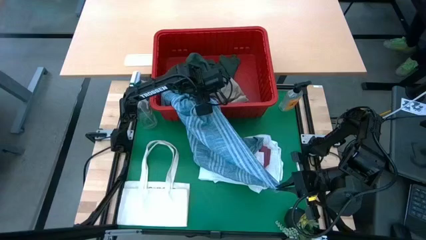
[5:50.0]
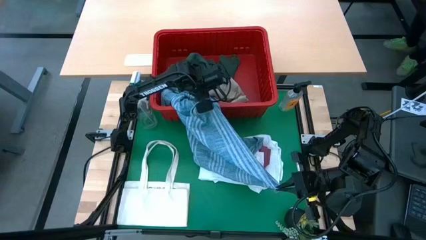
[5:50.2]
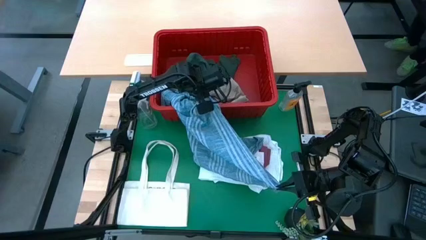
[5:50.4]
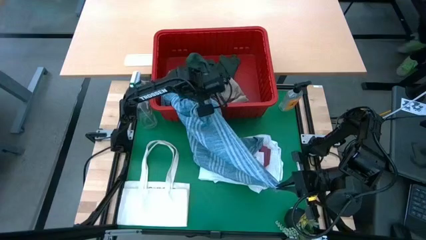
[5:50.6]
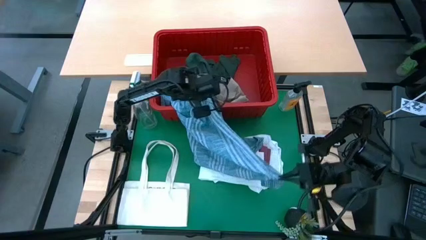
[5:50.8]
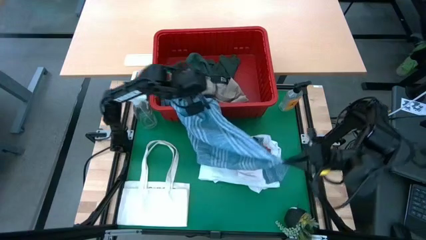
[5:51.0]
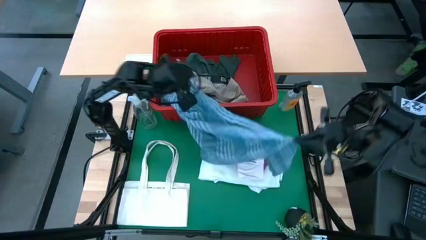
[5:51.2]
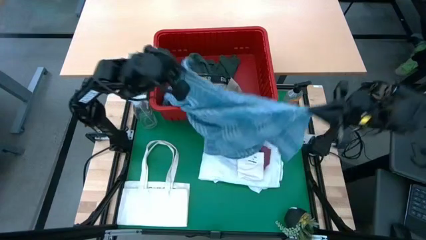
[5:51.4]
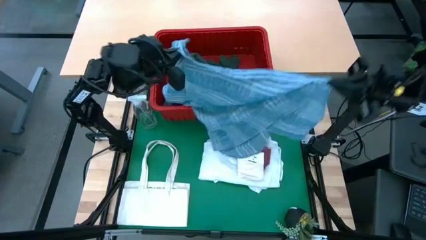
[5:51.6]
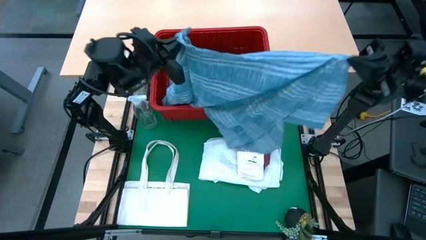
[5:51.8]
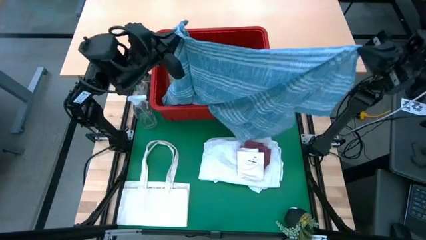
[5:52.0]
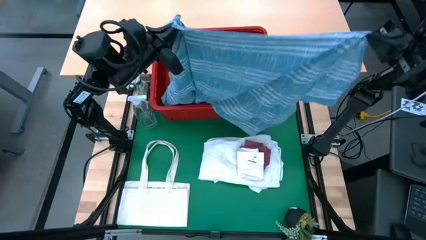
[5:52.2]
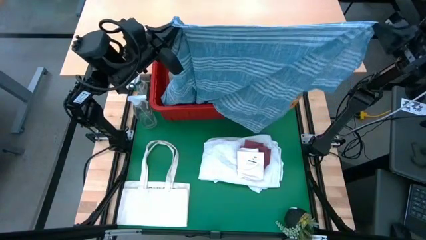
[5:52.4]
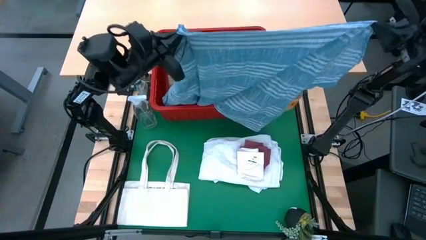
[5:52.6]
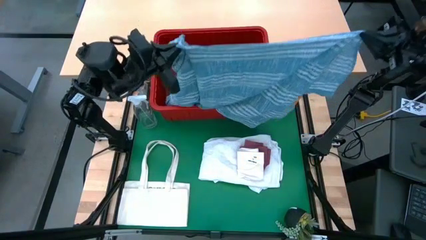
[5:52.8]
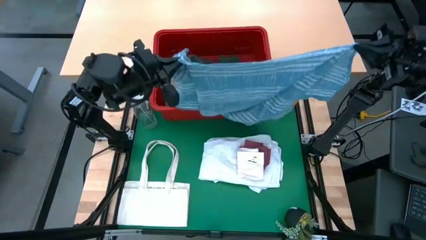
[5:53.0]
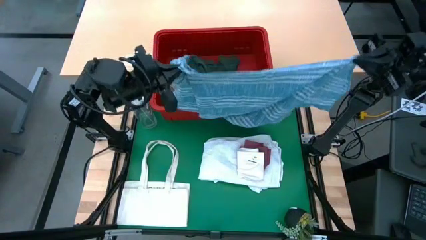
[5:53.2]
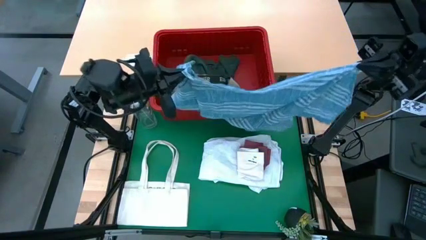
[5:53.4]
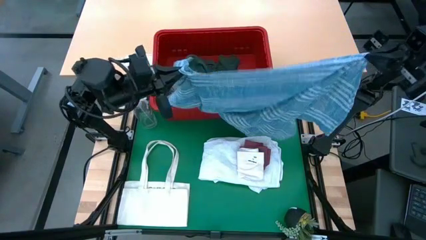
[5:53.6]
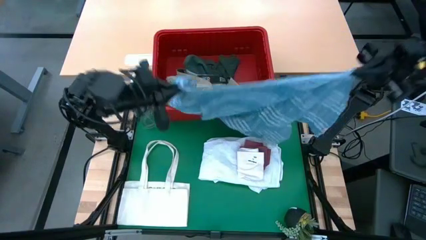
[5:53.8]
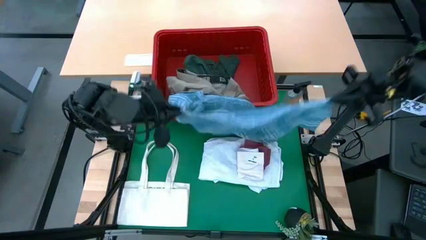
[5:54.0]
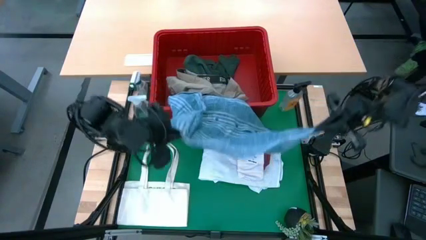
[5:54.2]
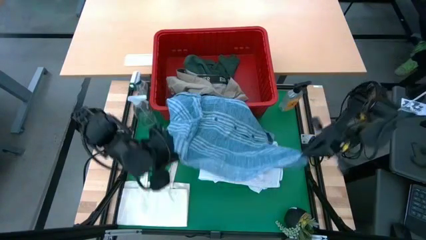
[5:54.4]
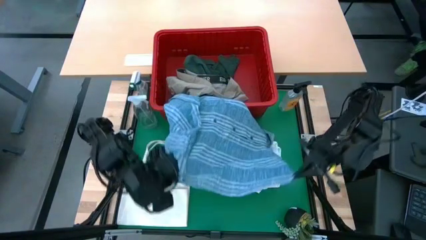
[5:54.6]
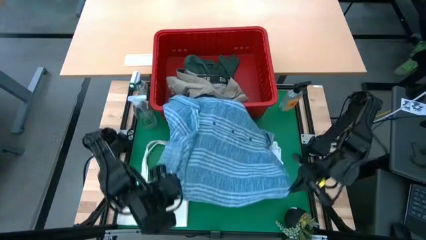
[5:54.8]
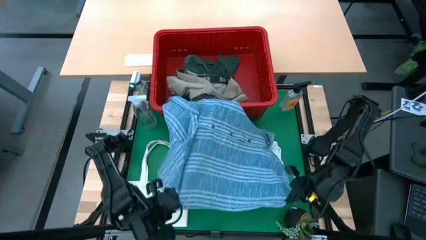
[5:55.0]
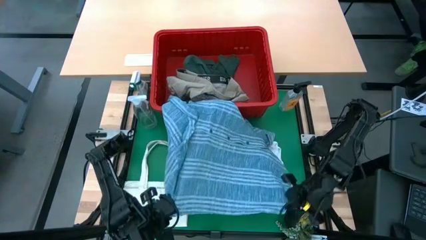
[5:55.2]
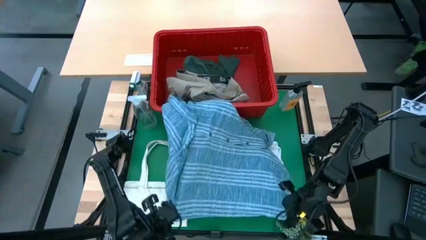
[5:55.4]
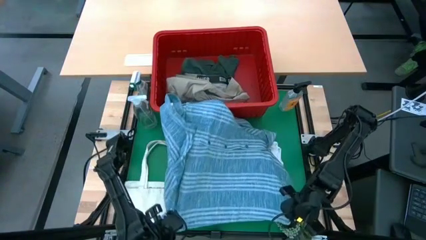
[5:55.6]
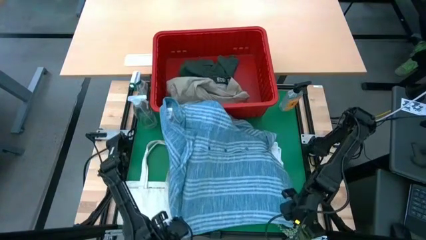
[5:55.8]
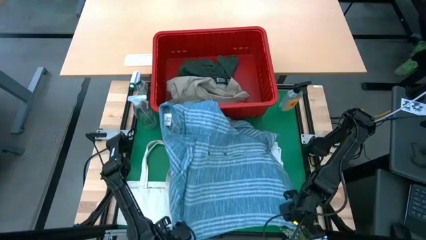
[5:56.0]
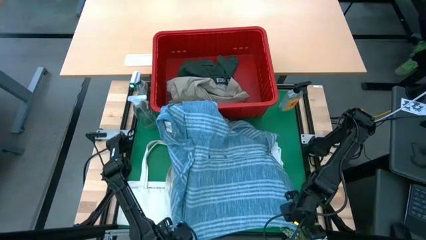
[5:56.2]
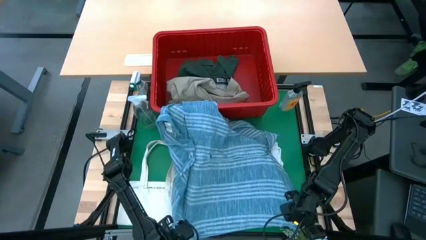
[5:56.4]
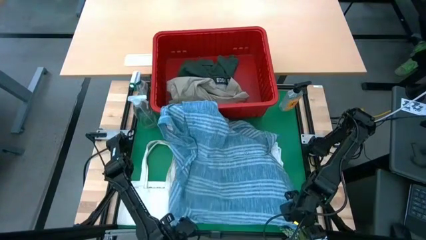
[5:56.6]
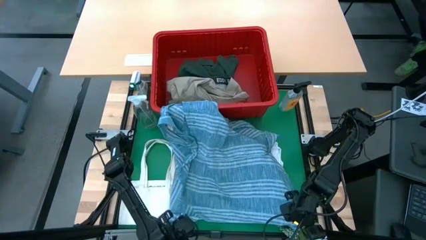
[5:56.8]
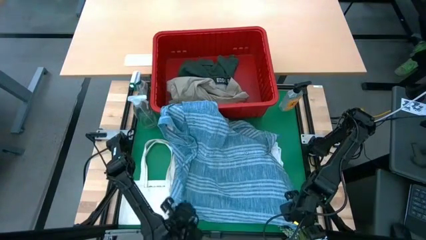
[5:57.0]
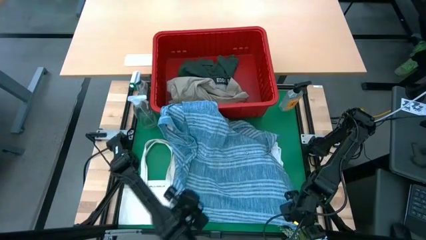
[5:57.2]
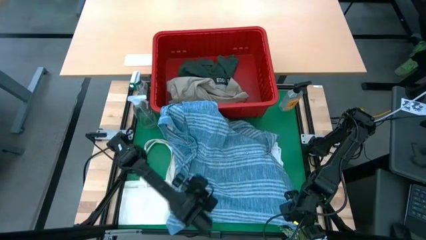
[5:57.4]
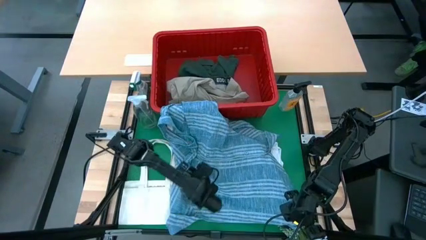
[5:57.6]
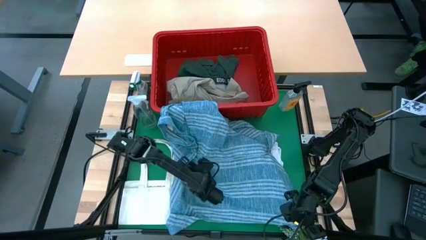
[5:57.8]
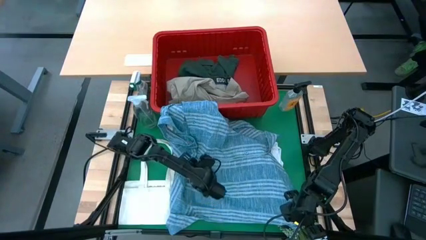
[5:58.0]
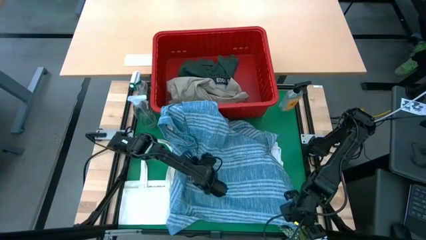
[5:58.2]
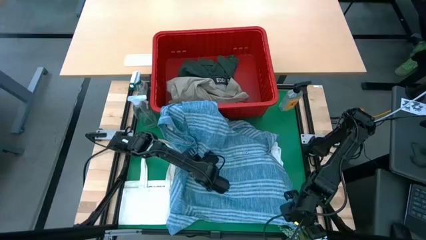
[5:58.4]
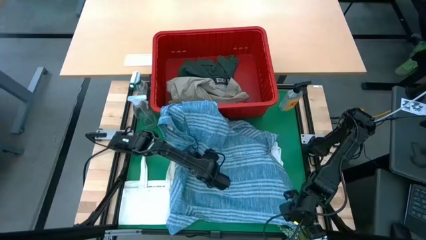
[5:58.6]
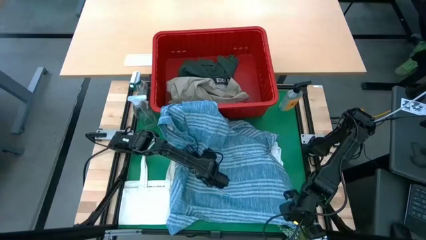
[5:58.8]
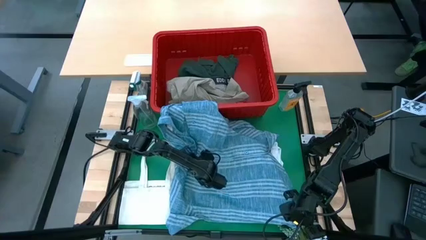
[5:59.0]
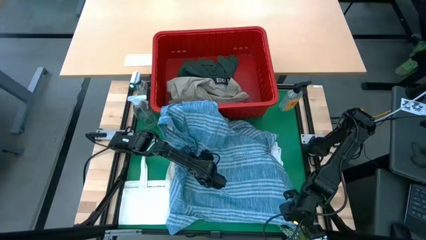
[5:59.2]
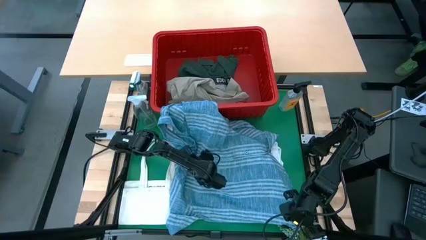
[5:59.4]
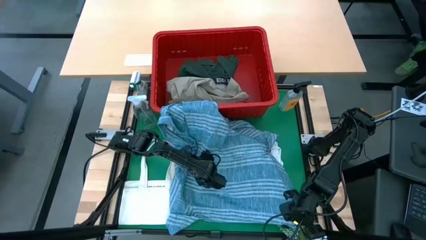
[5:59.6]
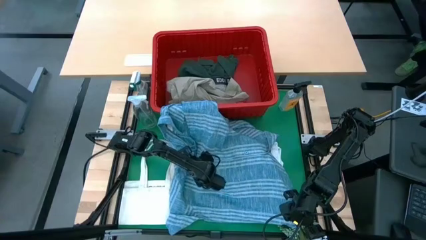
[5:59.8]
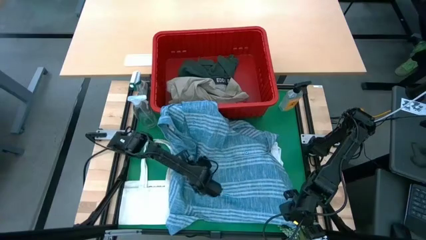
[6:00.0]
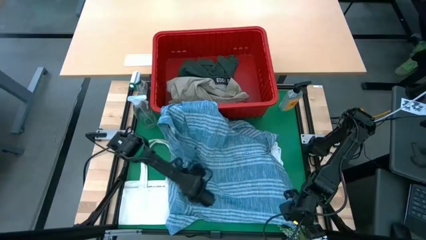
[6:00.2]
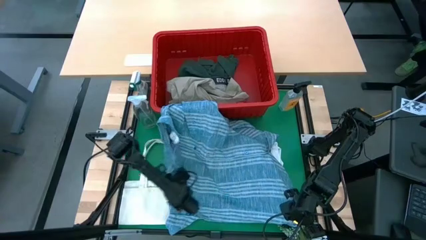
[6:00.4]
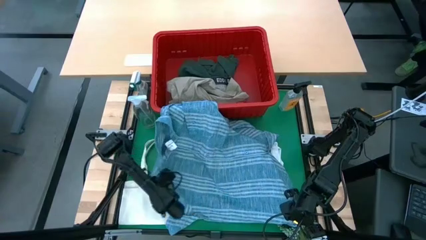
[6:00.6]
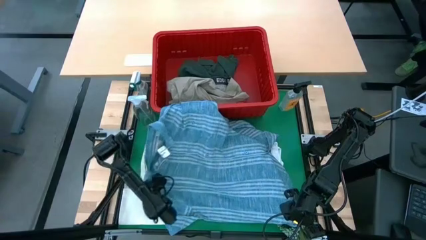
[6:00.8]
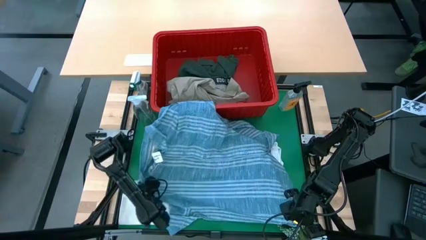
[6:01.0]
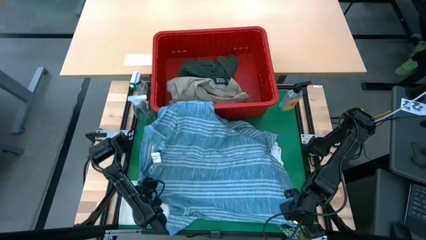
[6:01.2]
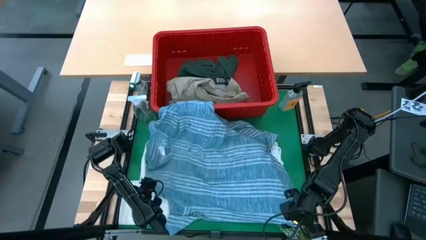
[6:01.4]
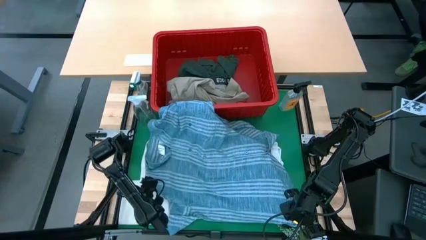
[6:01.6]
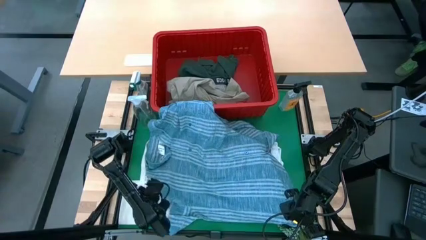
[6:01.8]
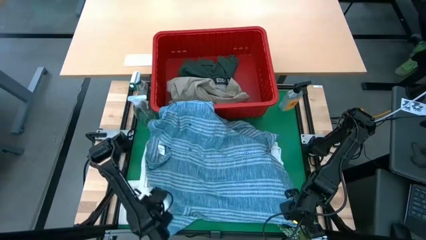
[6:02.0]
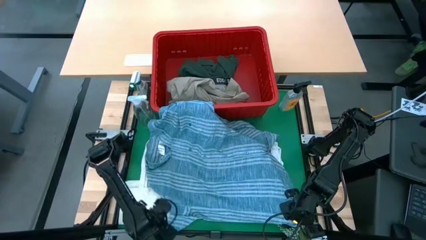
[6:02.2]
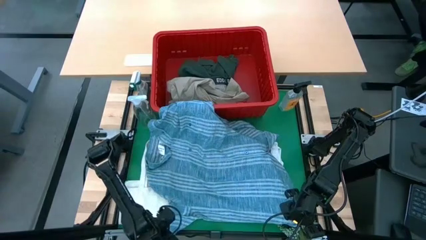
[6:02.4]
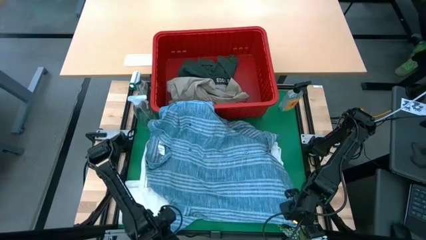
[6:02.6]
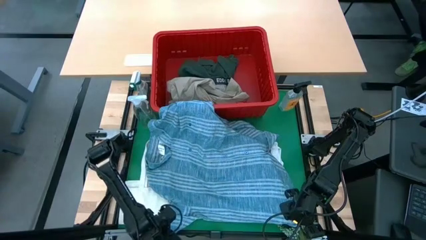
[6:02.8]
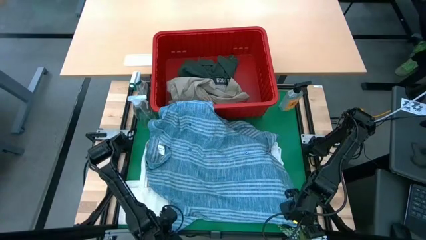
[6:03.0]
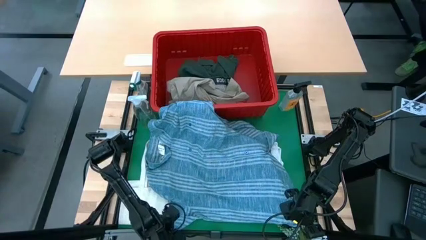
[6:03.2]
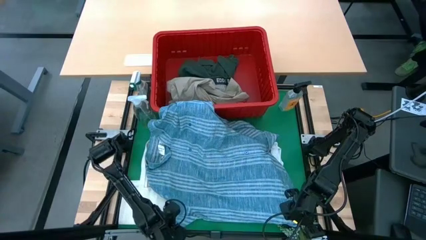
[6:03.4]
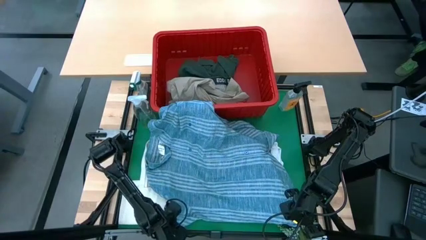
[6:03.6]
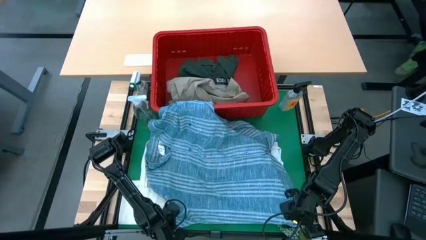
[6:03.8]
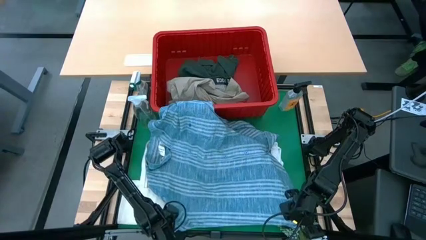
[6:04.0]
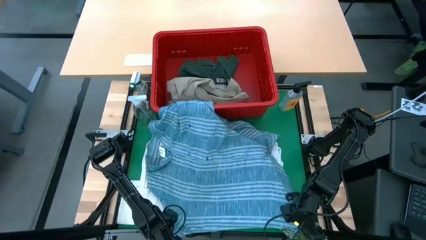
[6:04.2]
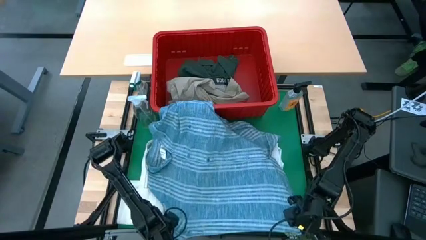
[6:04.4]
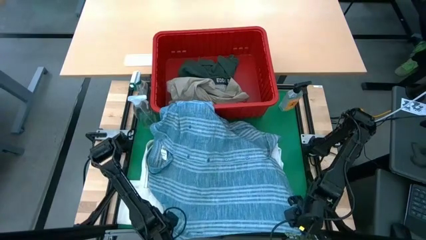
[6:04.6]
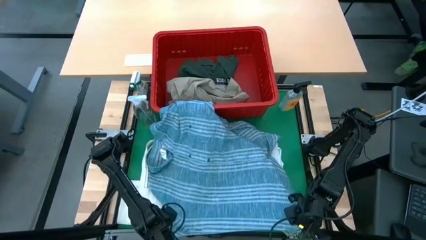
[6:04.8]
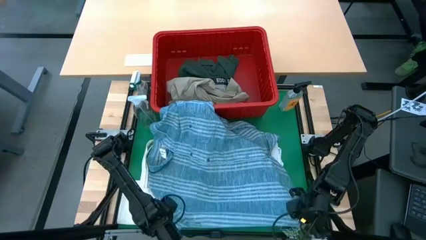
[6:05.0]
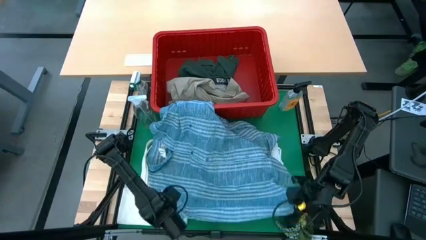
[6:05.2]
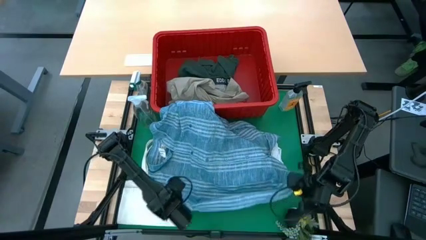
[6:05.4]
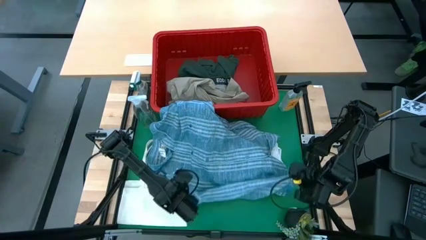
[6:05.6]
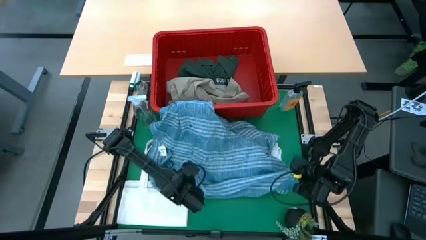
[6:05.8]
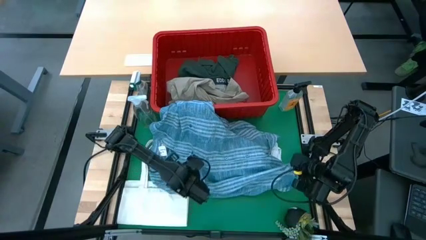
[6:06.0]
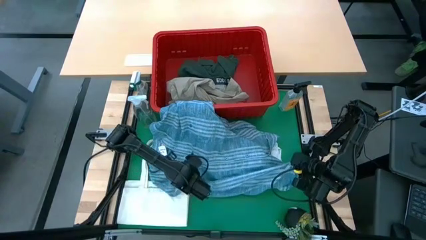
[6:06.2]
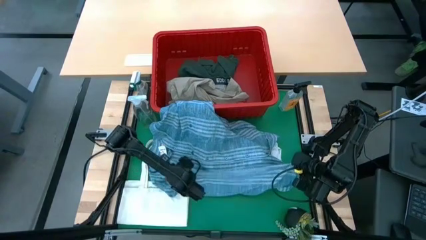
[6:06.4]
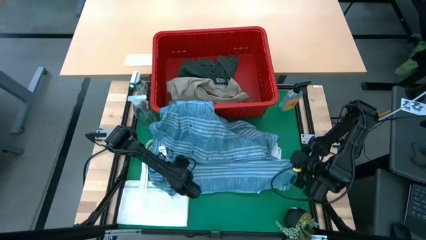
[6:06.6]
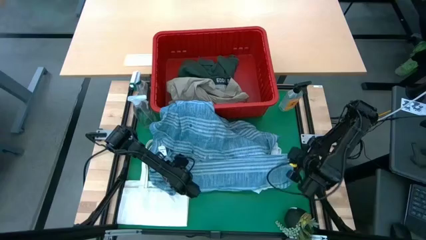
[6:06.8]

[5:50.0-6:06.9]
Task: Fold Laundry from Bin
Fold the blue checkered polo shirt
